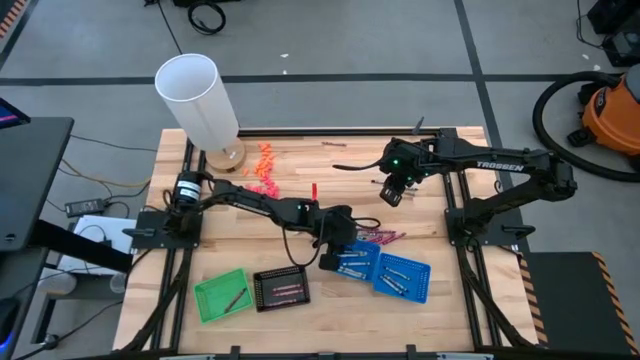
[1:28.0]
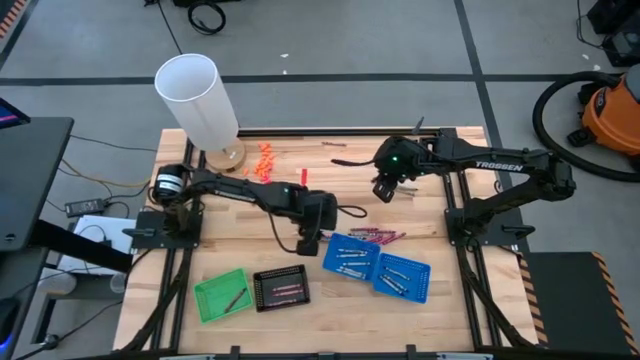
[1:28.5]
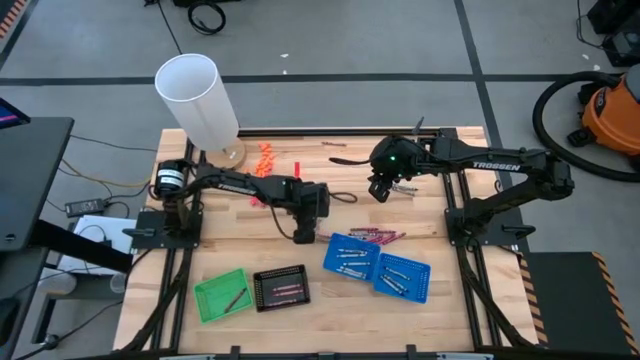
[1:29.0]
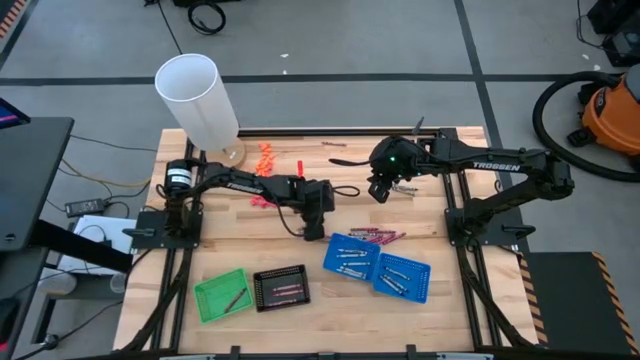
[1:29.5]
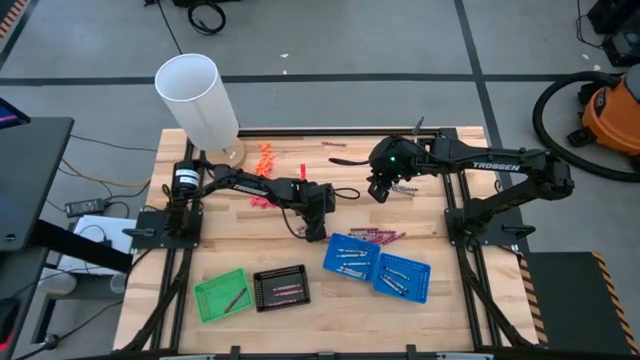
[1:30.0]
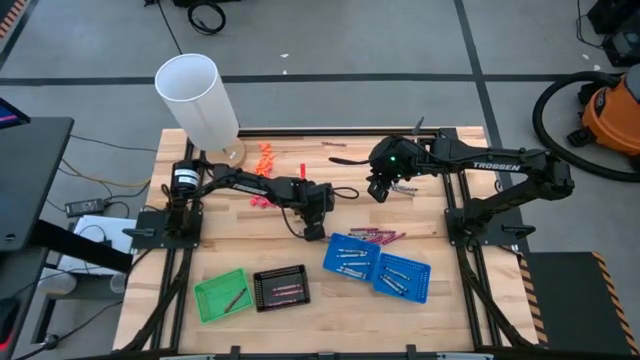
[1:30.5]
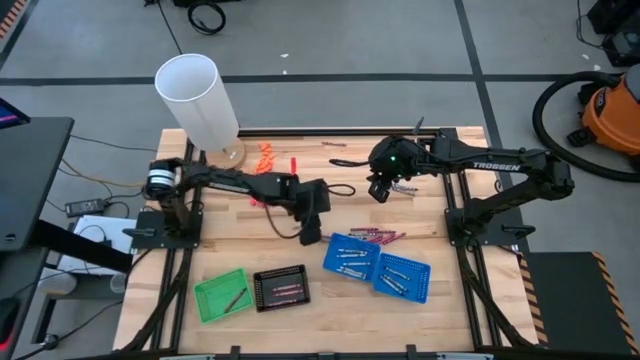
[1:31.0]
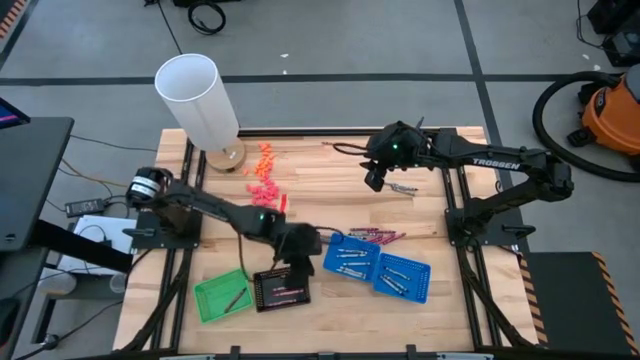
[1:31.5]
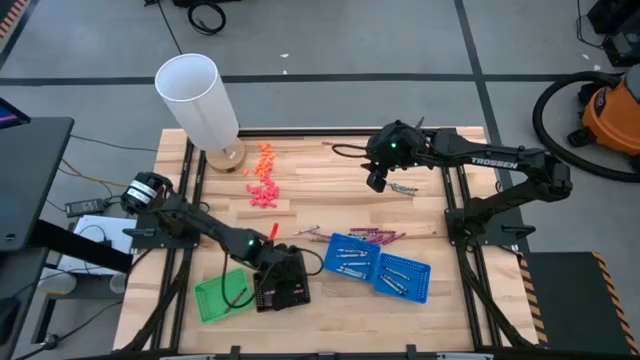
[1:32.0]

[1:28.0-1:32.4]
Task: Sort crayons
Put the pink crayon into the black bin

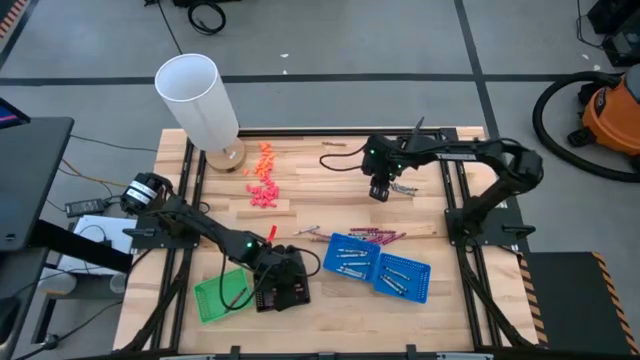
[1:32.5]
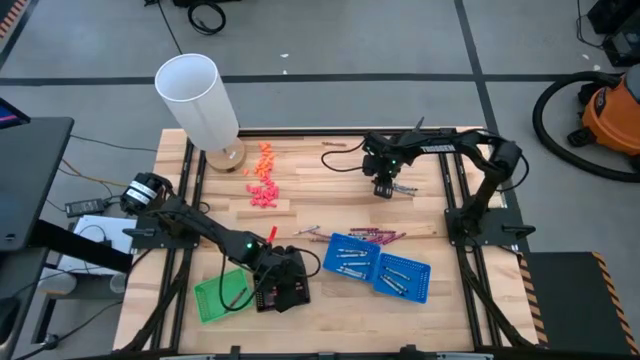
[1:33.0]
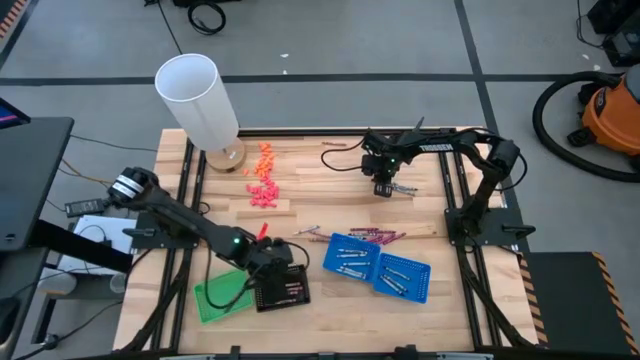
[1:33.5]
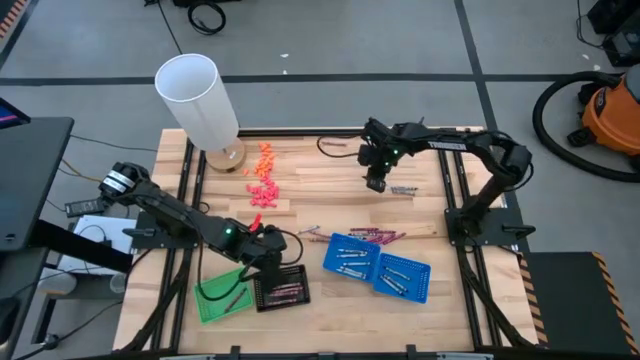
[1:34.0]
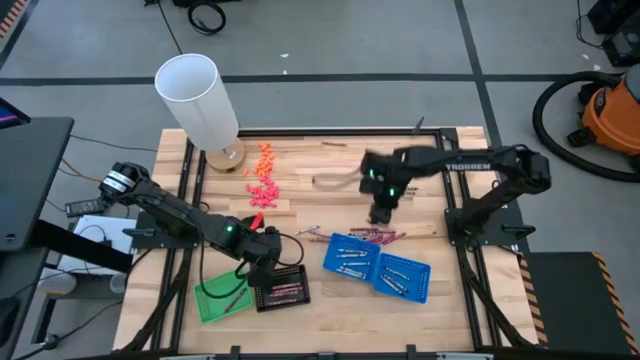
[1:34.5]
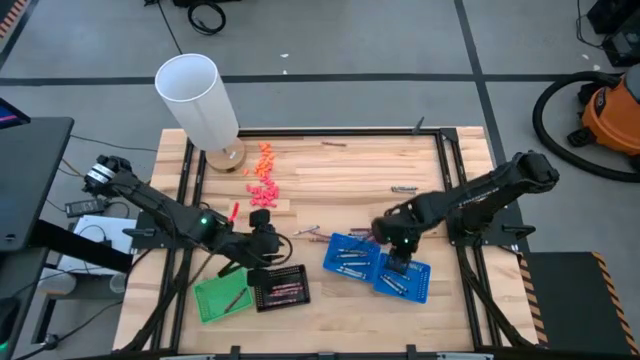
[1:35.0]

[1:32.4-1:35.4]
Put the black crayon into the right blue bin

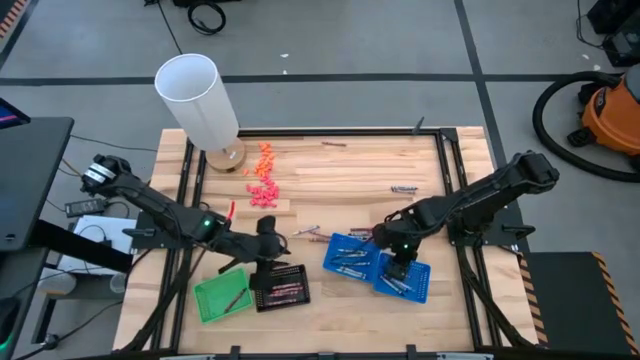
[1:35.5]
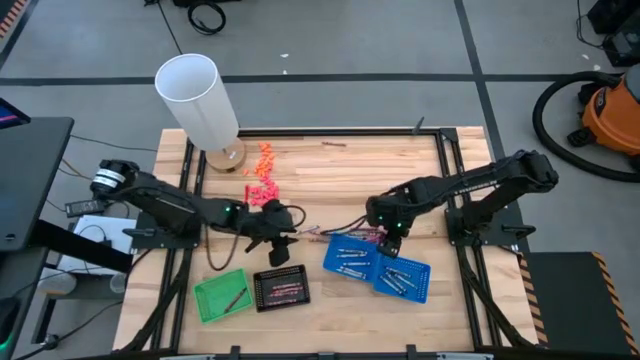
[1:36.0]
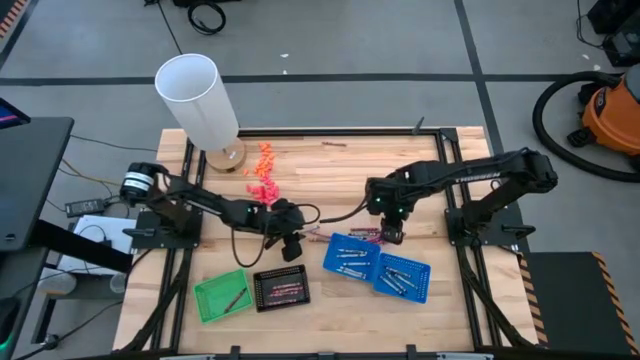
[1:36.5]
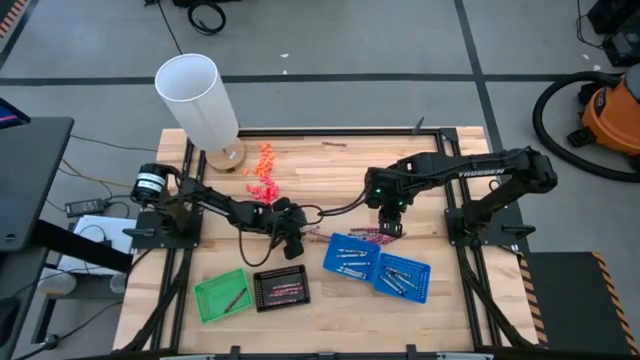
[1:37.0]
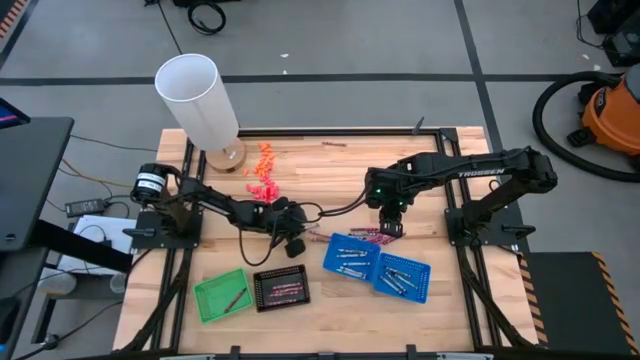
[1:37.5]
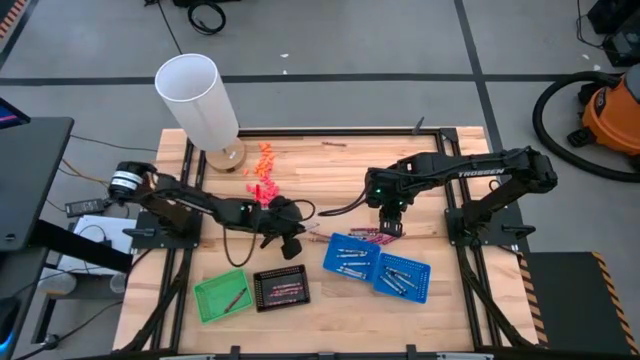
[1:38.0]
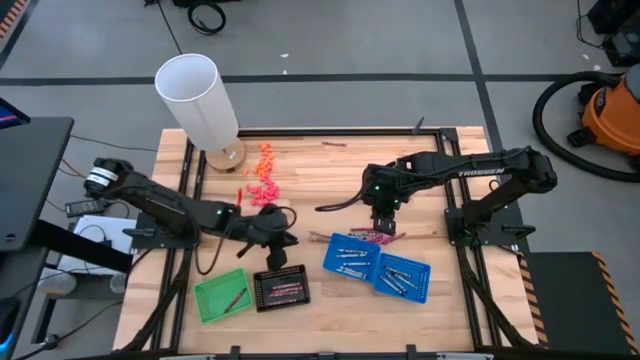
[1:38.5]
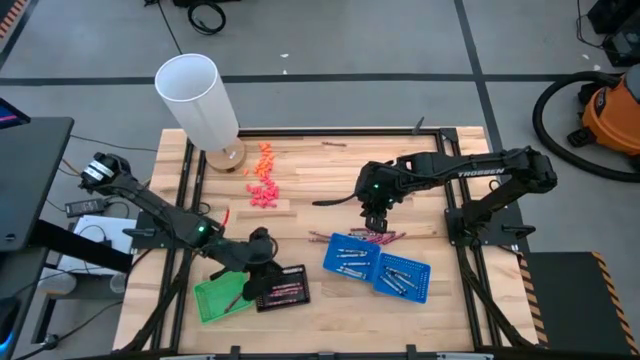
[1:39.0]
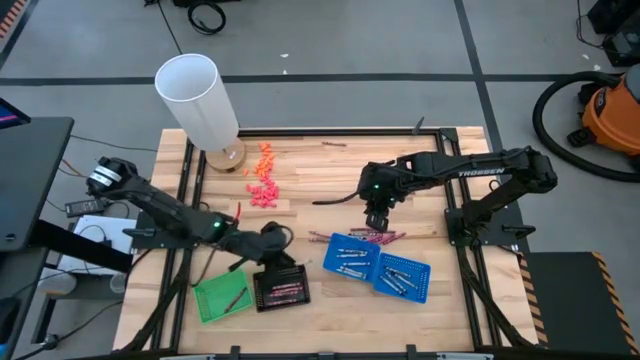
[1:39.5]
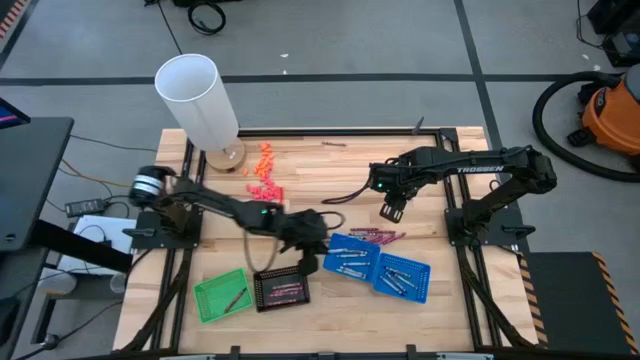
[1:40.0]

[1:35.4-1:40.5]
Put the white crayon into the left blue bin

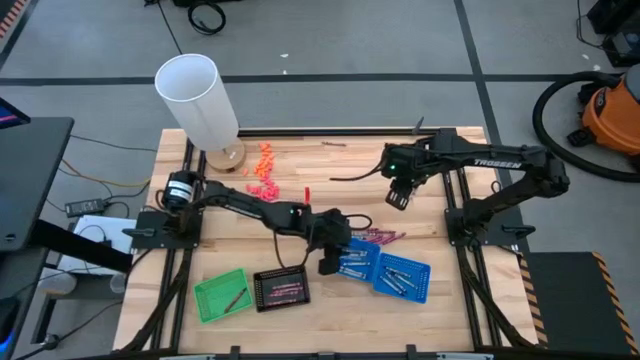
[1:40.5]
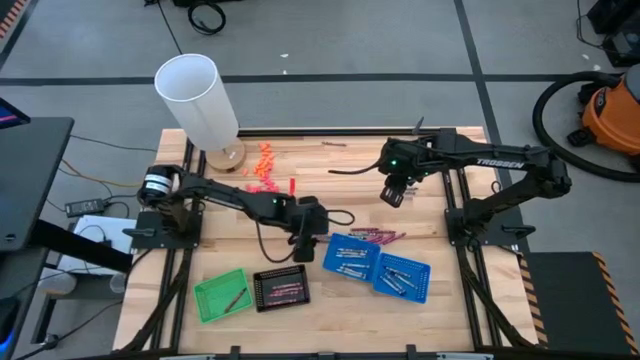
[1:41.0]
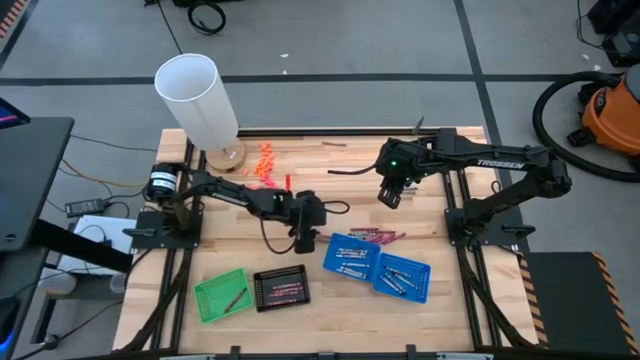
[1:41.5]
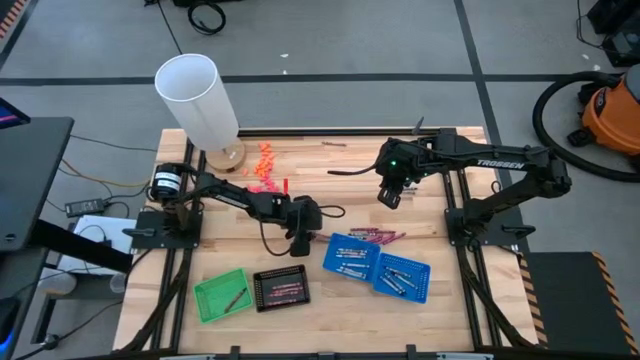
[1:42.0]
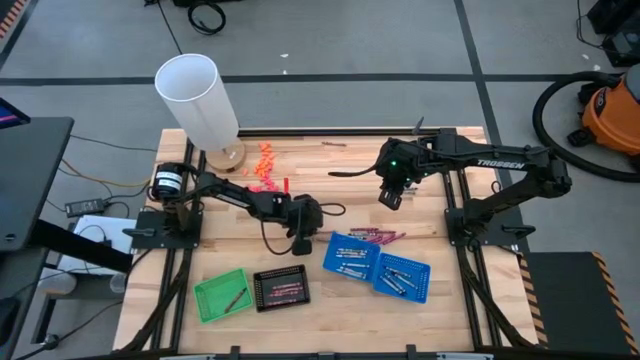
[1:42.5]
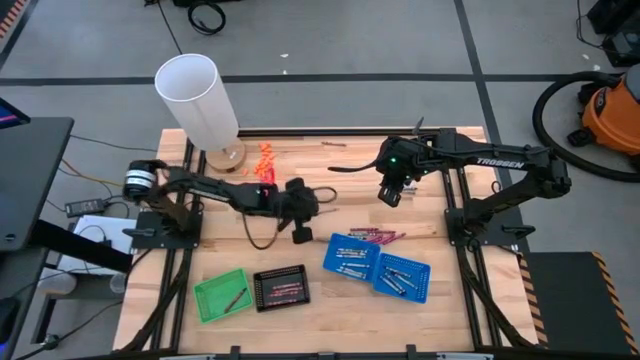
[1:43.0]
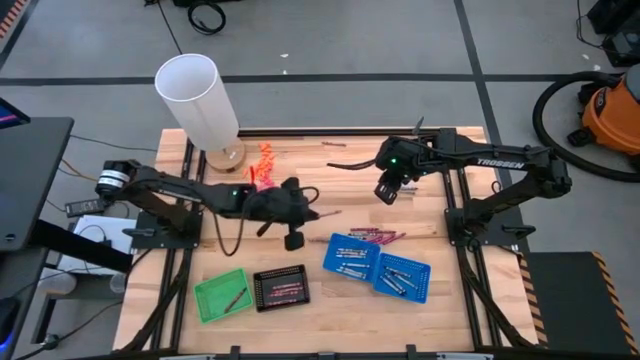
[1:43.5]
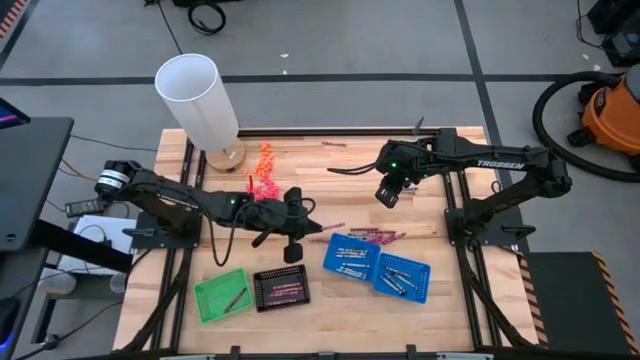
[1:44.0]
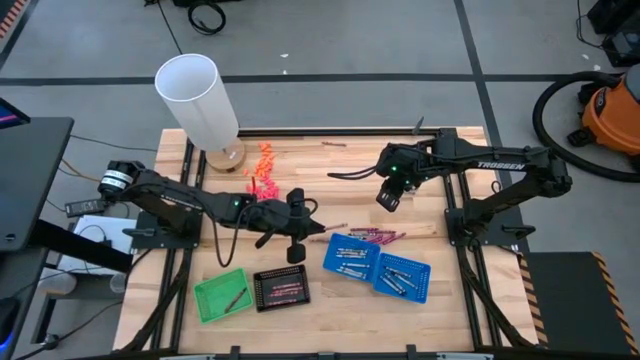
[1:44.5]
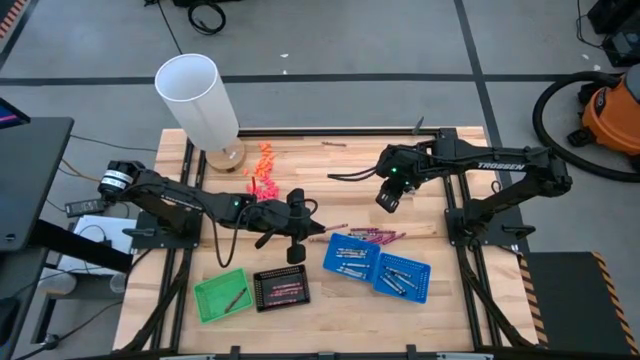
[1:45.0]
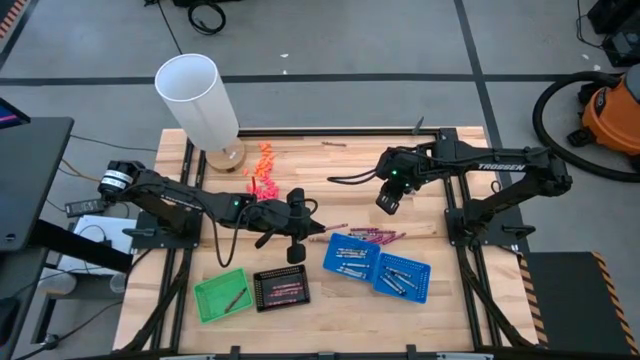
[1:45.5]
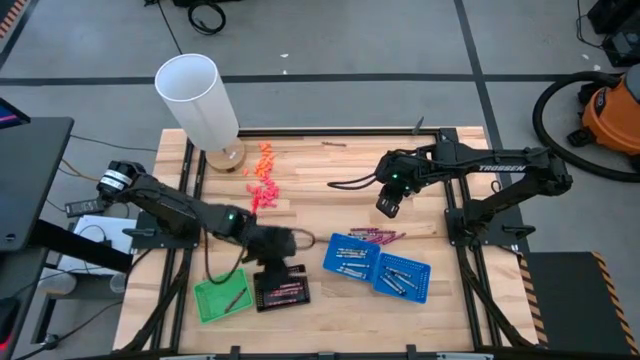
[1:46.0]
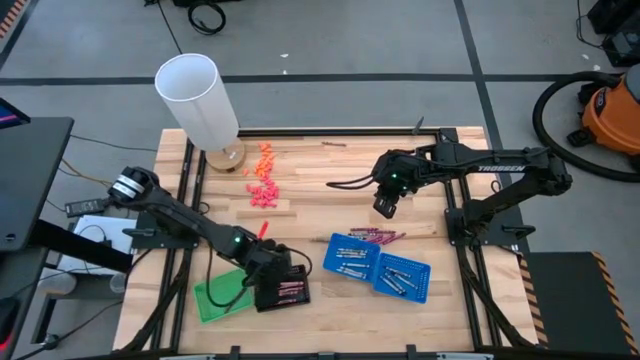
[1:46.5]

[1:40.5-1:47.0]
Put the pink crayon into the black bin

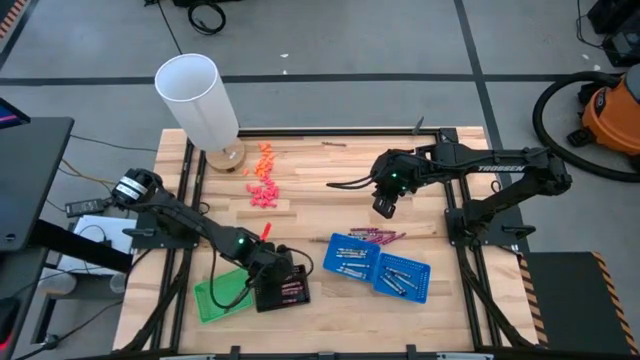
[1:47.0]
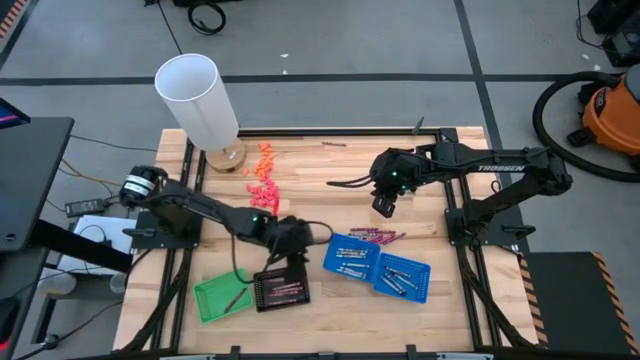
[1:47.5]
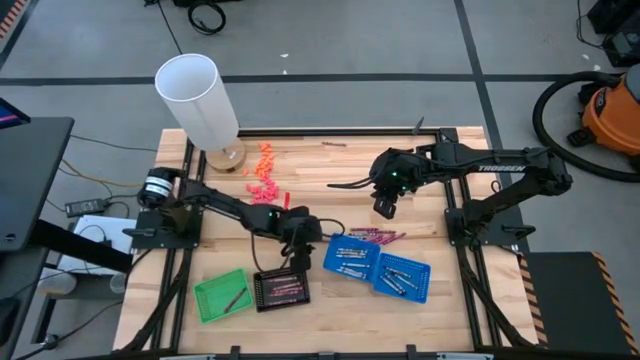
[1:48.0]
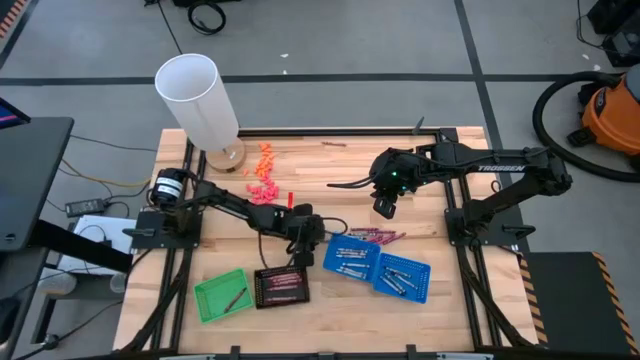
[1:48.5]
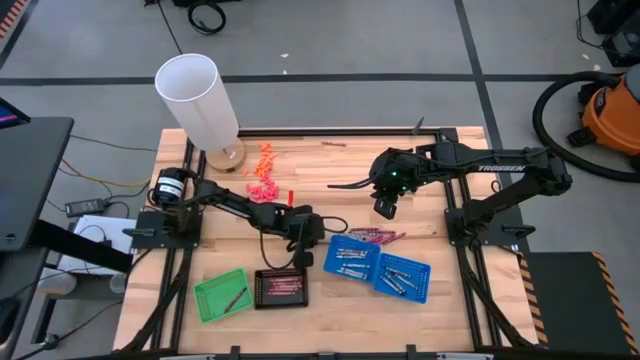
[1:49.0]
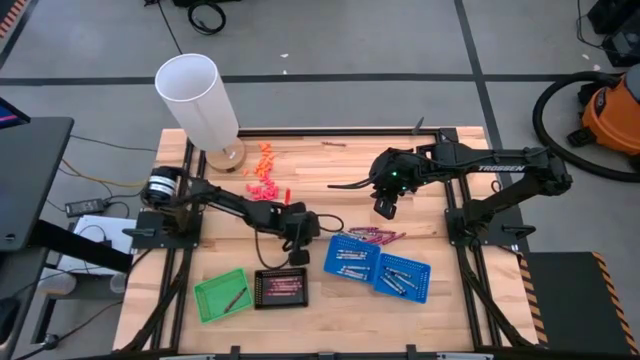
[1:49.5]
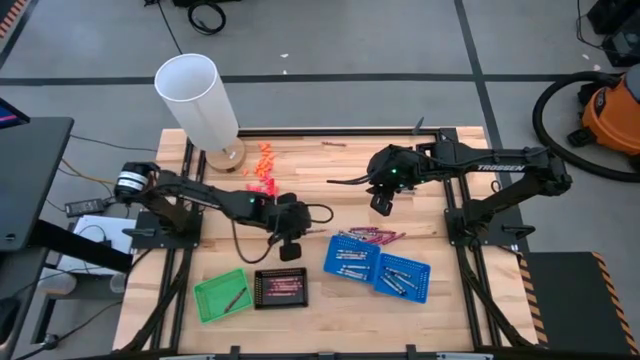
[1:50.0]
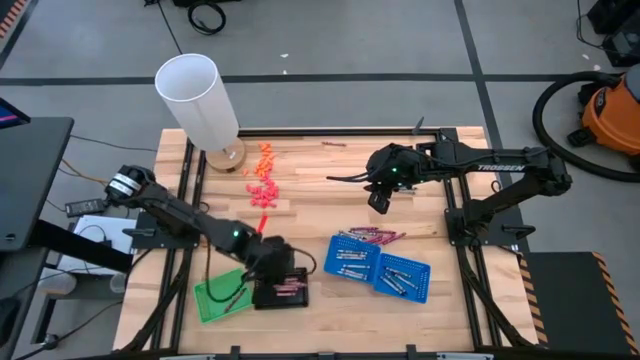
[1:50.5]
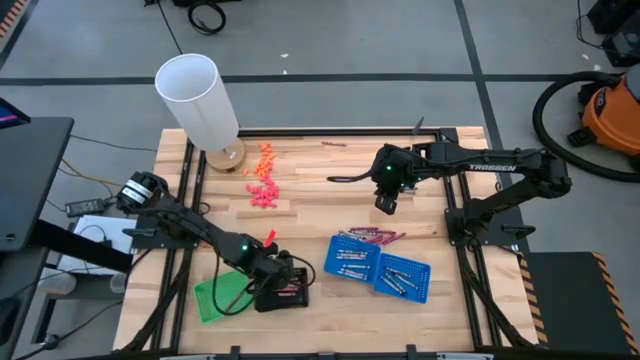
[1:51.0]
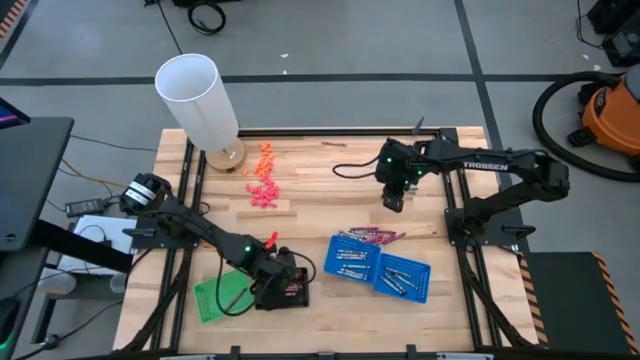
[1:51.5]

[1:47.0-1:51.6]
Put the pink crayon into the black bin
